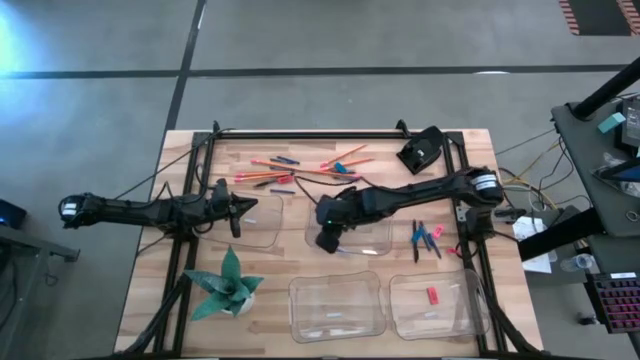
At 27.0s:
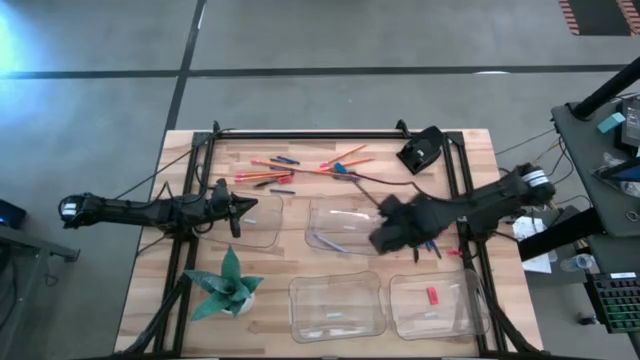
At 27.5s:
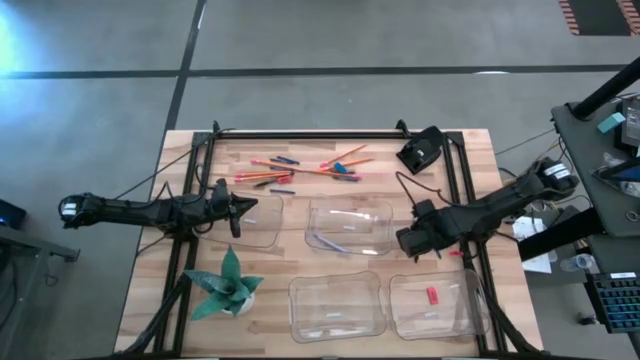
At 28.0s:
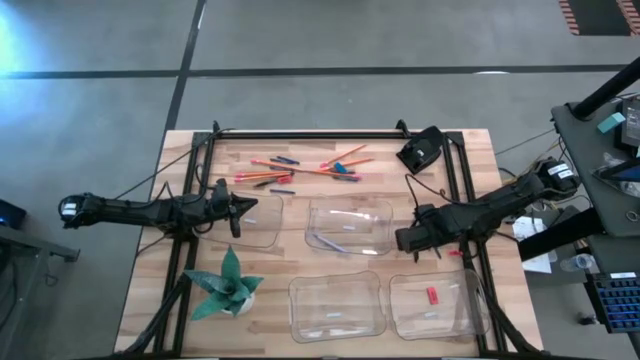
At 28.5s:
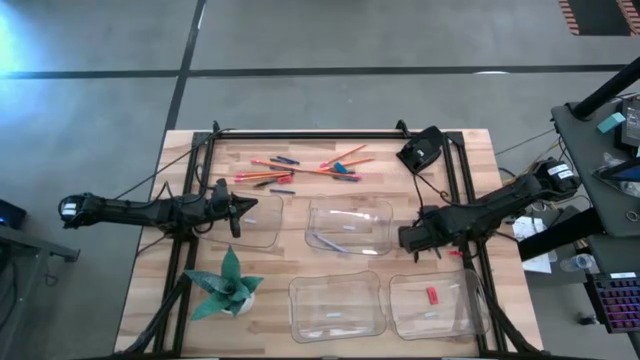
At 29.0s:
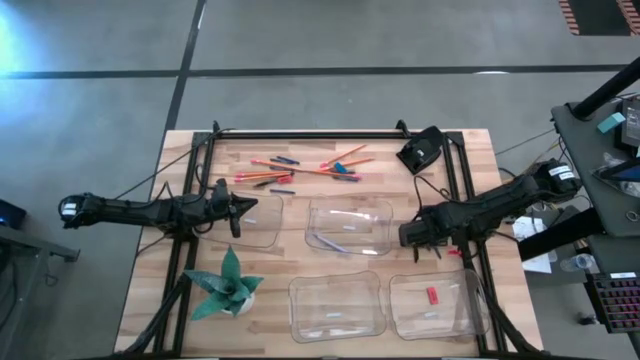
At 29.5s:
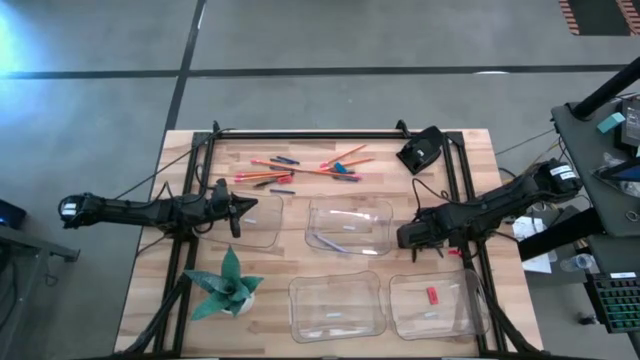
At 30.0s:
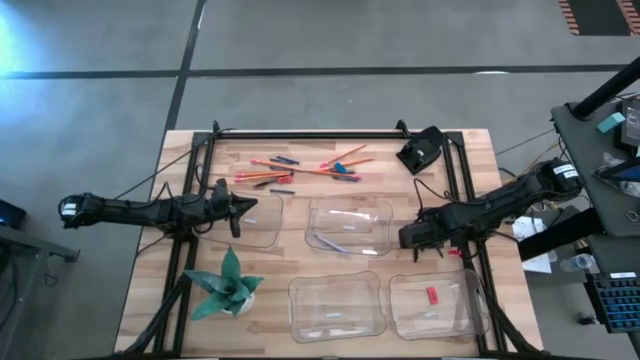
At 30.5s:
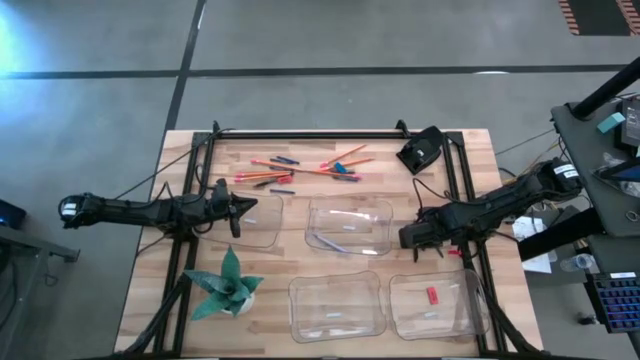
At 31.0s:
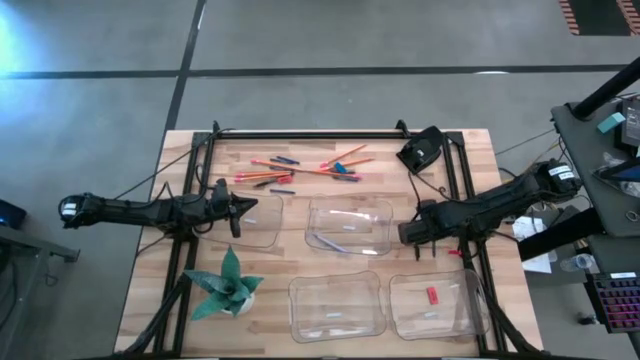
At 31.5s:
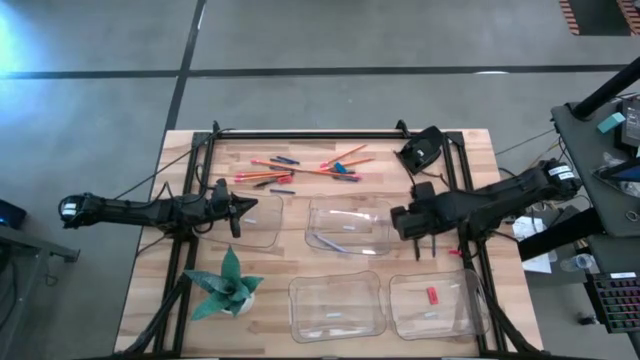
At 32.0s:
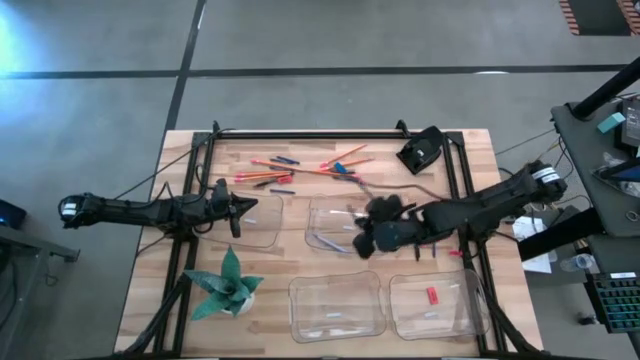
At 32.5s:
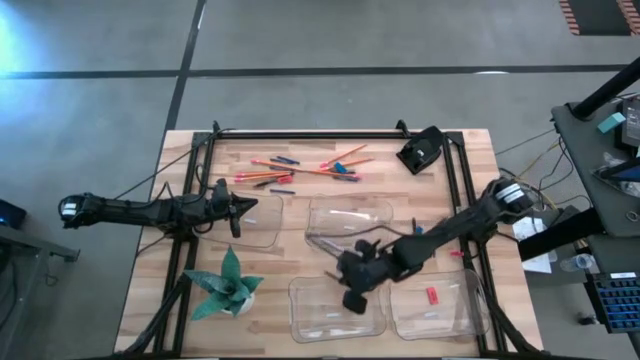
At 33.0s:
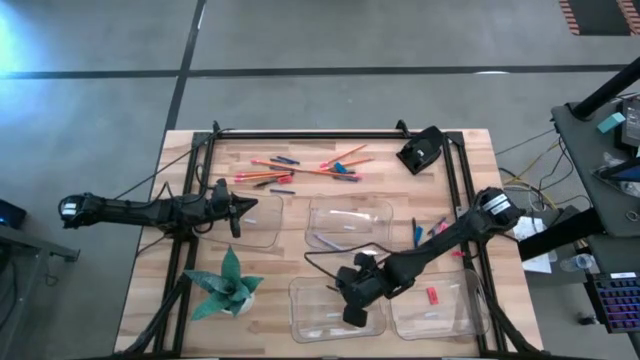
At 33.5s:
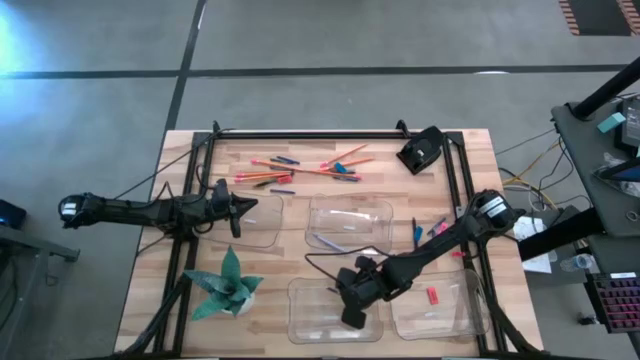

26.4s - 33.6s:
Task: Sort crayons/erasers/pens/pencils in bins
Put the blue crayon into the bottom left transparent bin

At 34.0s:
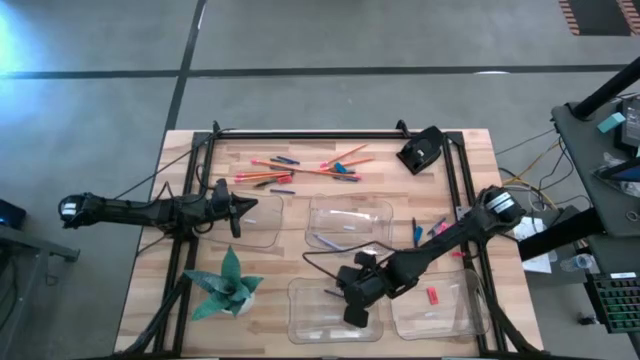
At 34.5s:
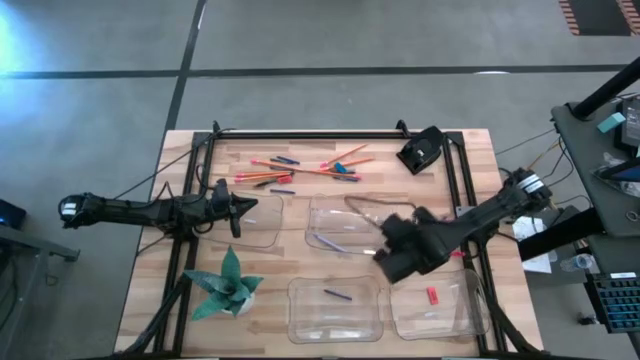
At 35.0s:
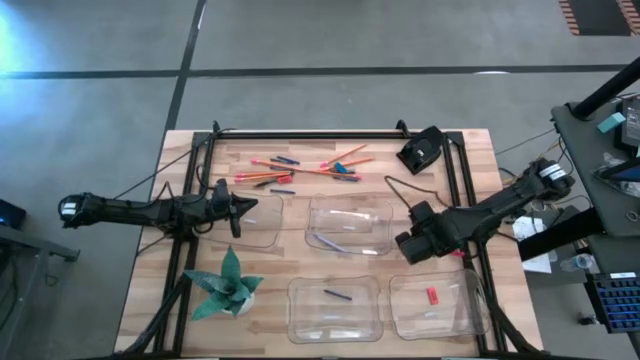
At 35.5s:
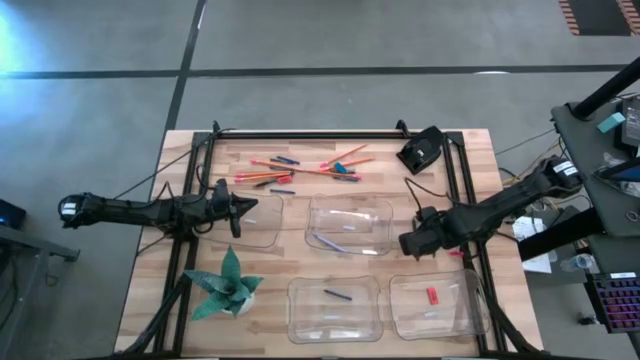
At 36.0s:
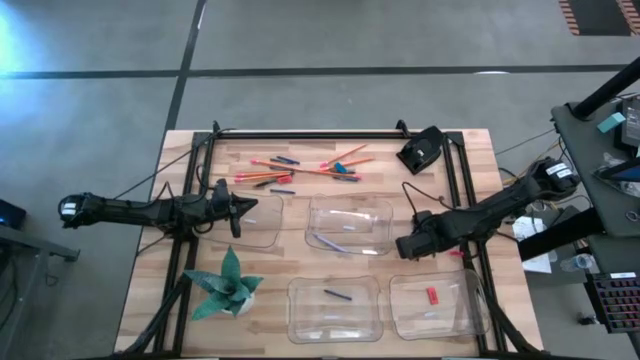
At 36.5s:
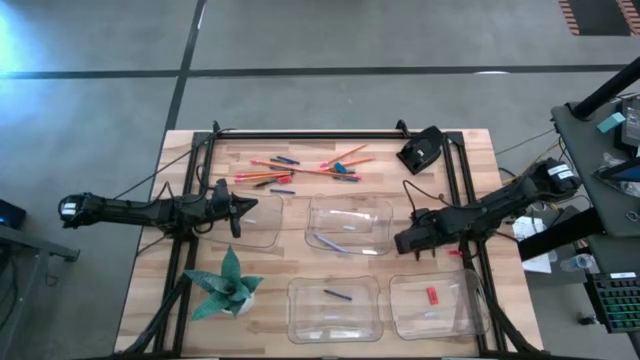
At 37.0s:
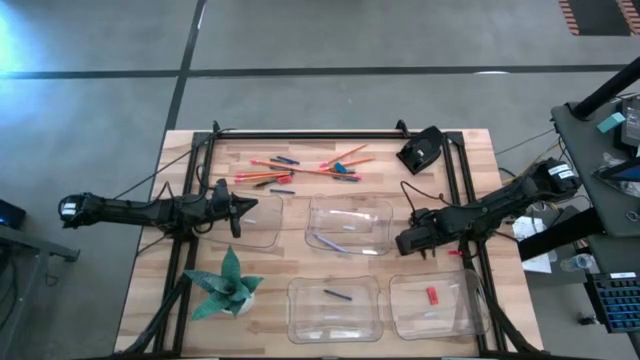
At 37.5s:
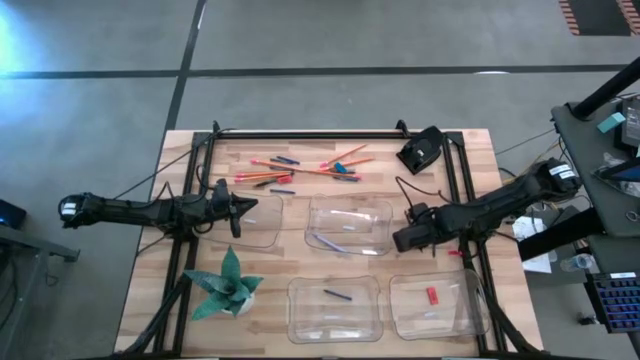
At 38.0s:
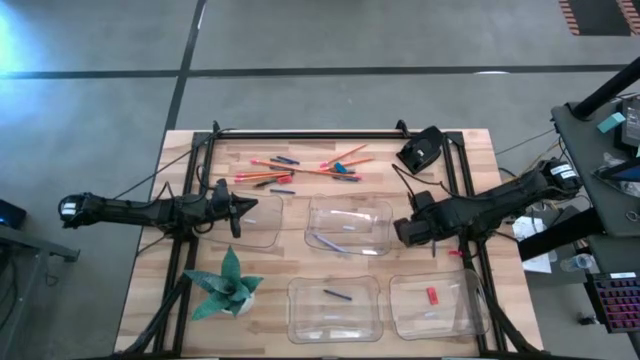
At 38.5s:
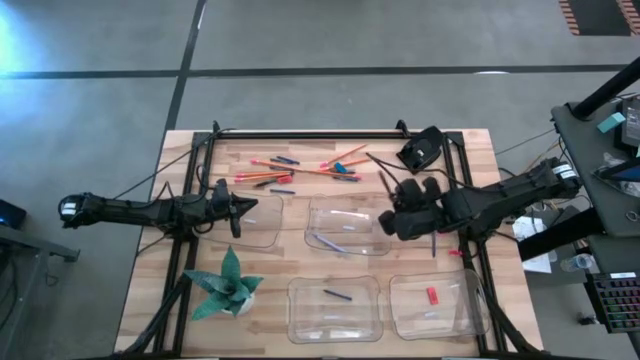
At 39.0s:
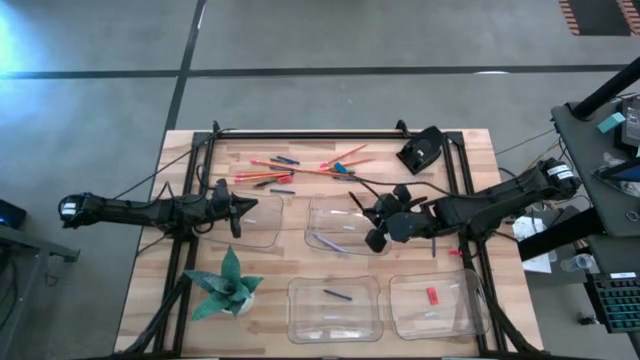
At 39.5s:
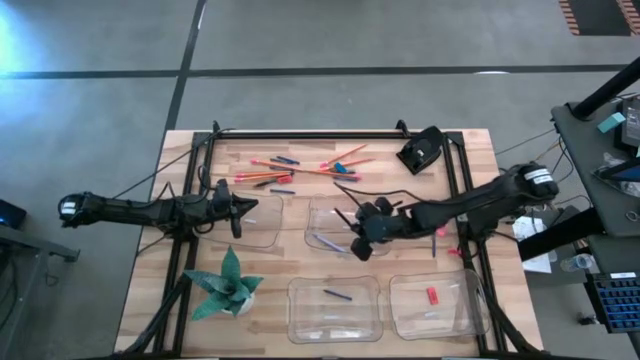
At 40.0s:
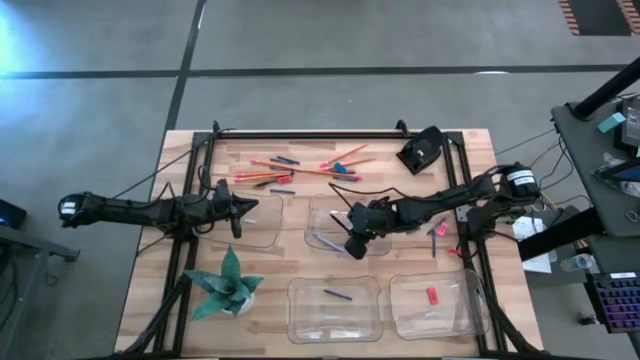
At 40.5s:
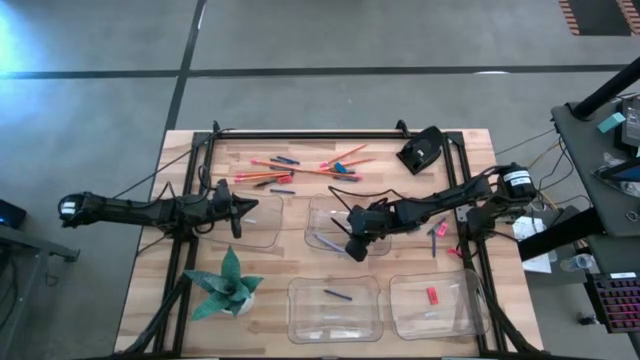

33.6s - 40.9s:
Put the black pen into the top right transparent bin

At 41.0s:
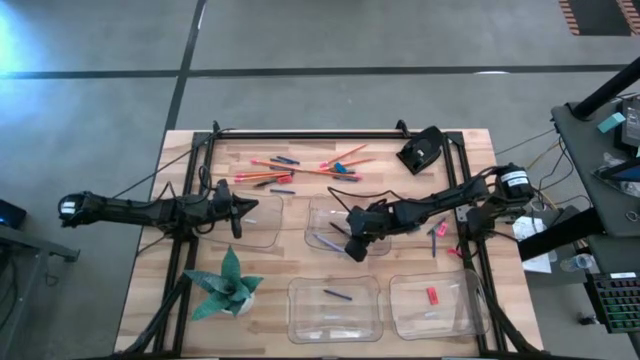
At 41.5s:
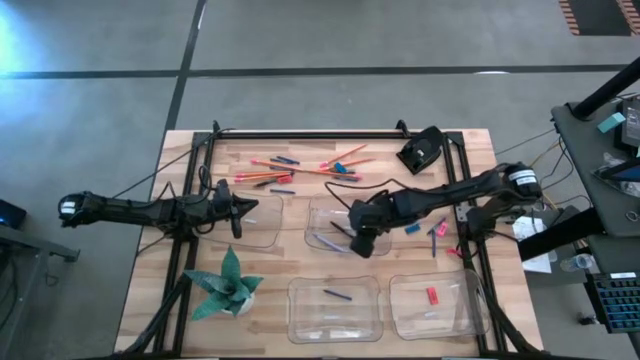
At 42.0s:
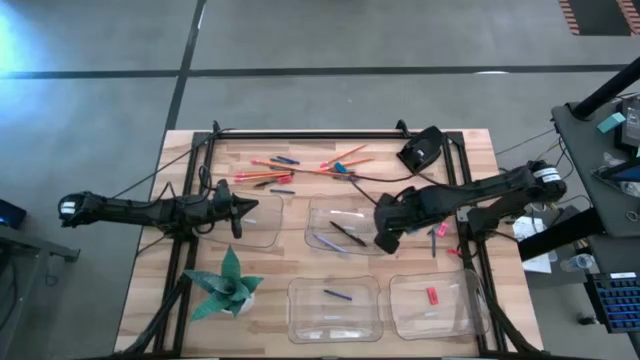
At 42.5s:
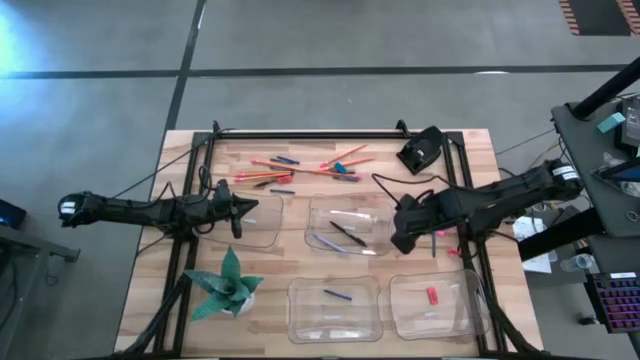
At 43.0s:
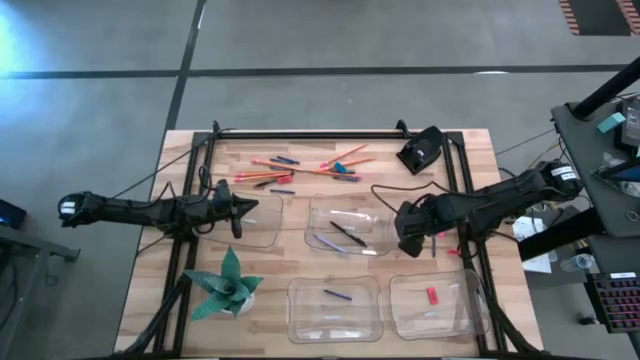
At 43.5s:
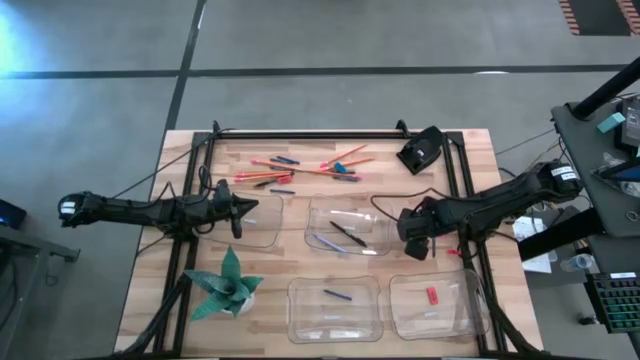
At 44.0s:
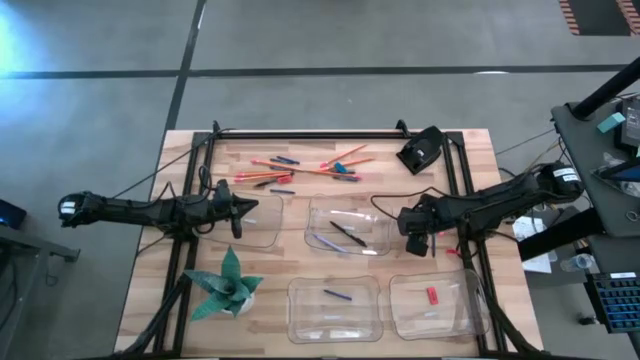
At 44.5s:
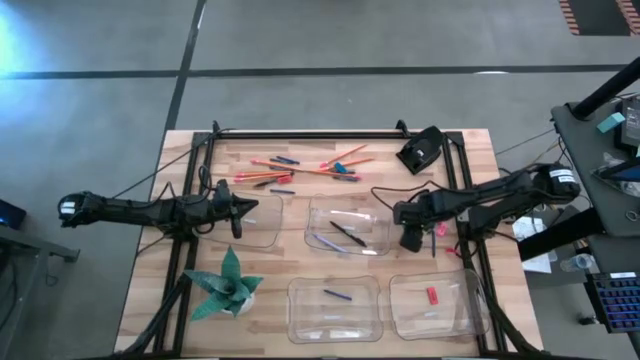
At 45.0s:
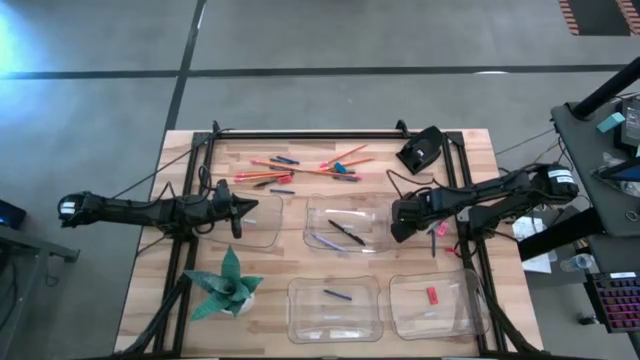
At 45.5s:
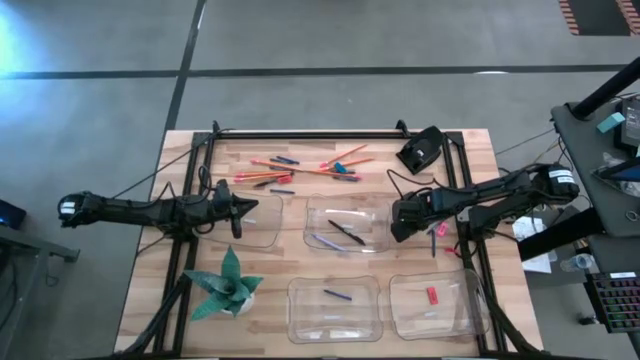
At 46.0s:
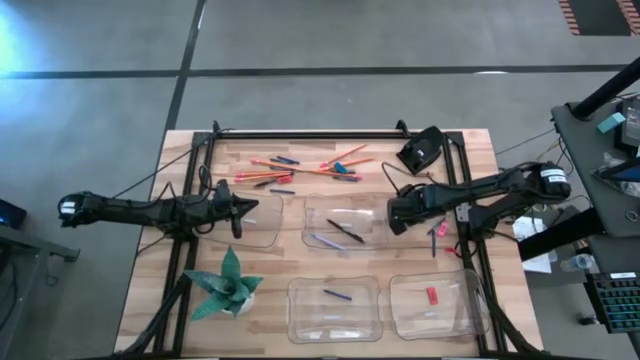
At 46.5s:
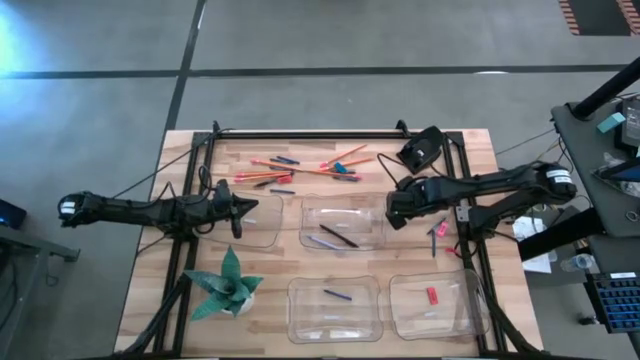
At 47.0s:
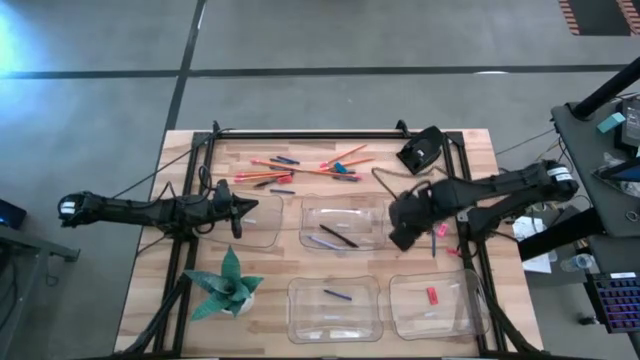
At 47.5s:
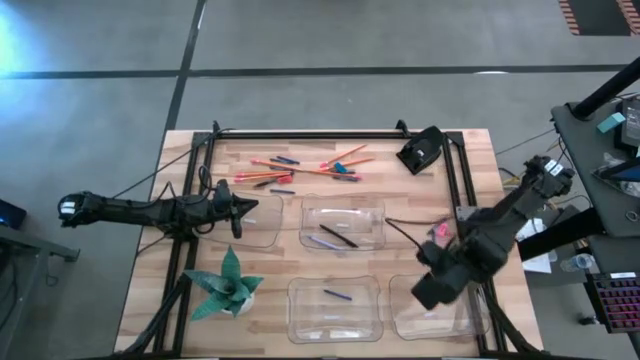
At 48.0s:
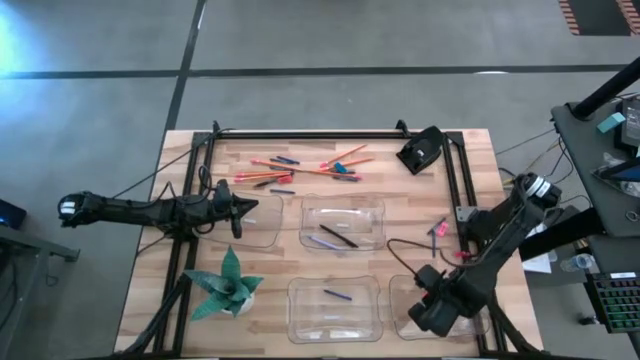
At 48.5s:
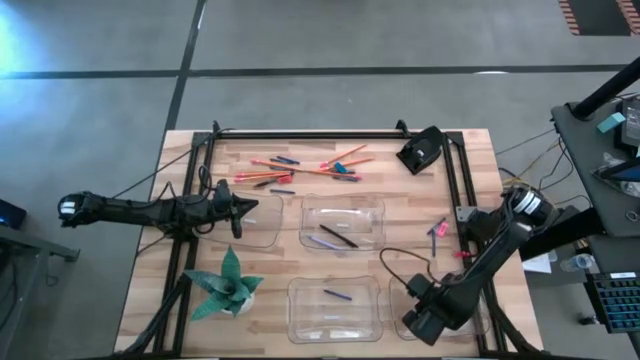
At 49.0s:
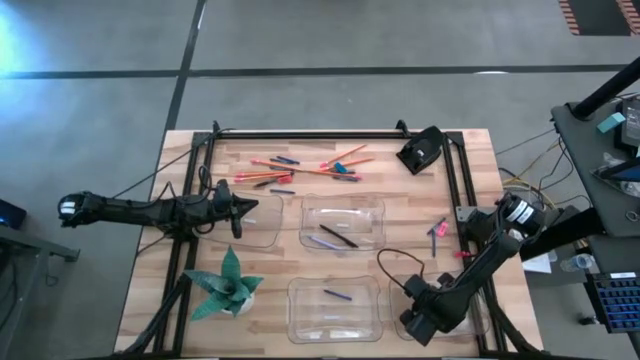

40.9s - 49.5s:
Put the blue eraser into the bottom right transparent bin
